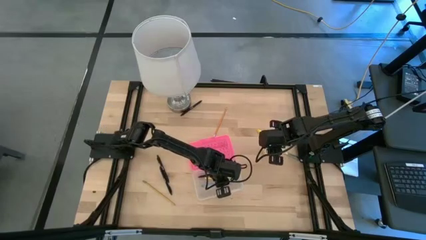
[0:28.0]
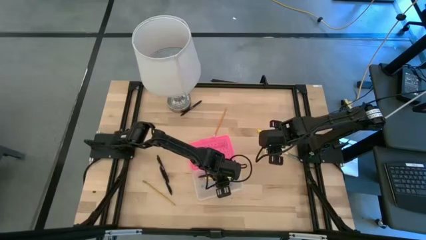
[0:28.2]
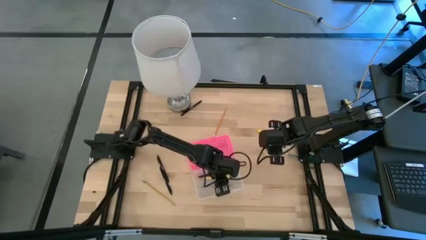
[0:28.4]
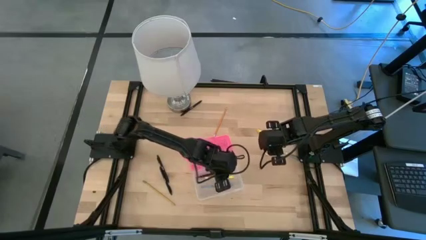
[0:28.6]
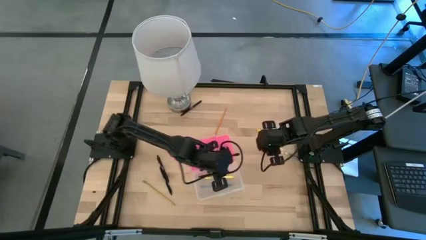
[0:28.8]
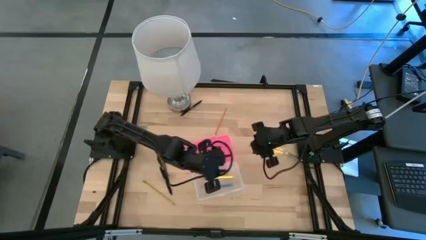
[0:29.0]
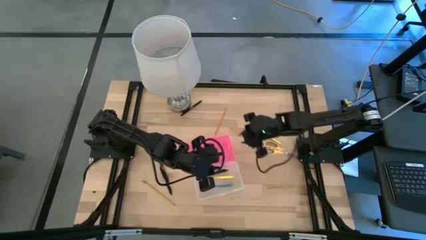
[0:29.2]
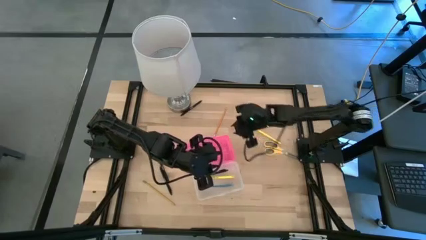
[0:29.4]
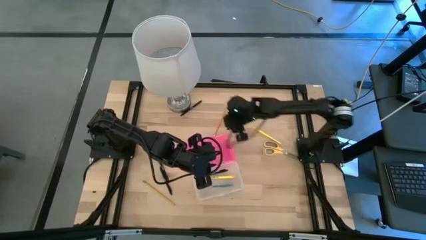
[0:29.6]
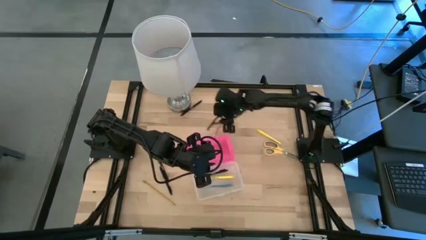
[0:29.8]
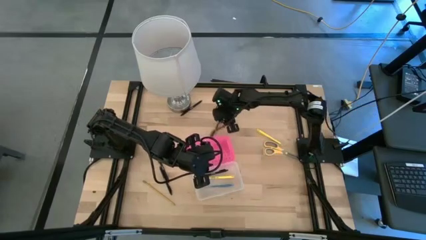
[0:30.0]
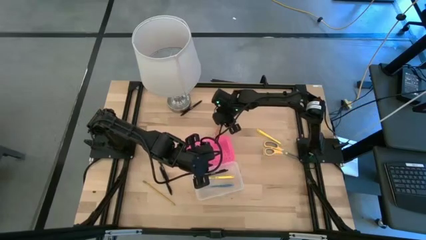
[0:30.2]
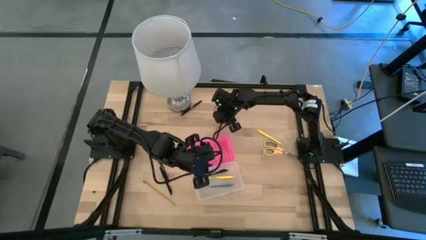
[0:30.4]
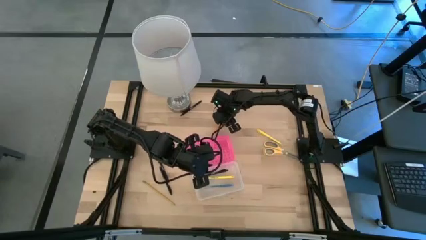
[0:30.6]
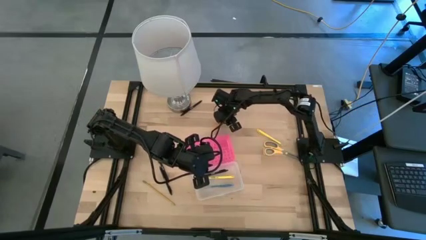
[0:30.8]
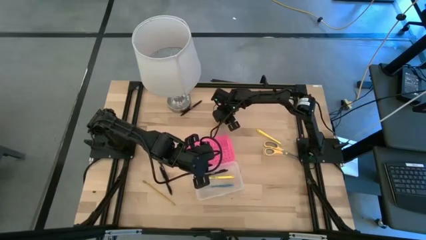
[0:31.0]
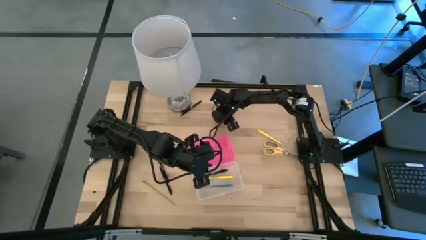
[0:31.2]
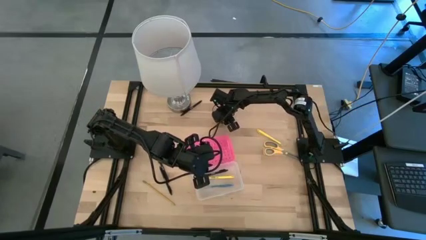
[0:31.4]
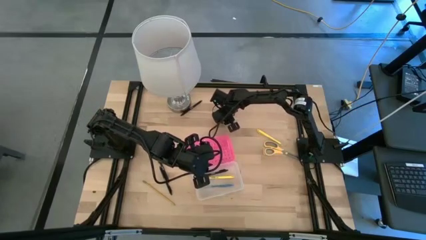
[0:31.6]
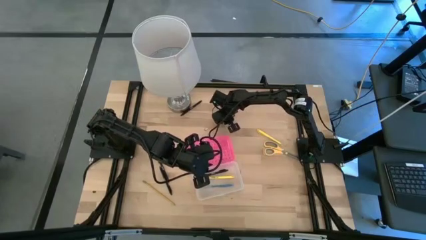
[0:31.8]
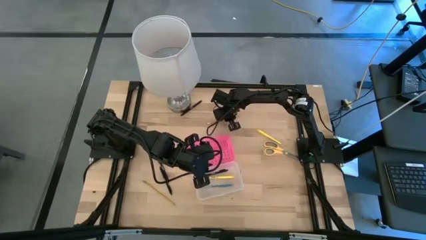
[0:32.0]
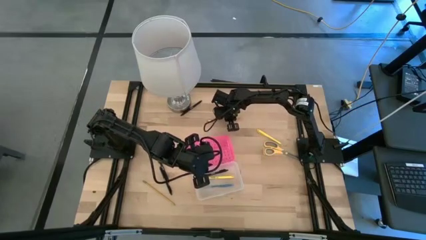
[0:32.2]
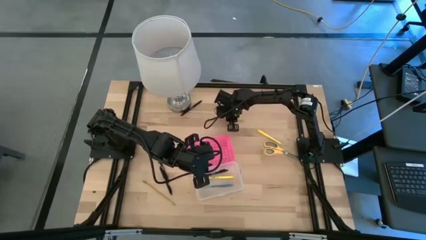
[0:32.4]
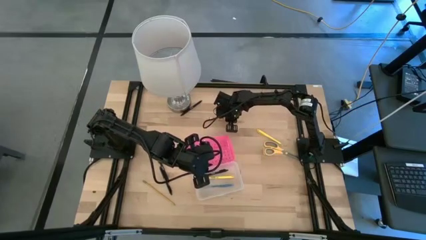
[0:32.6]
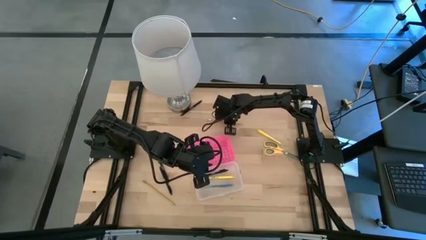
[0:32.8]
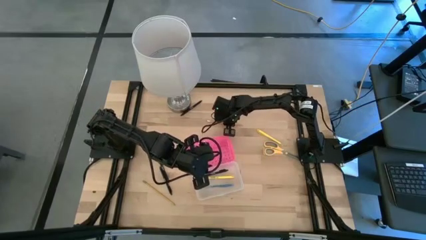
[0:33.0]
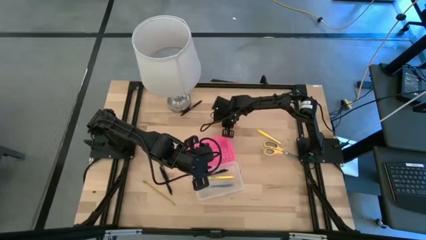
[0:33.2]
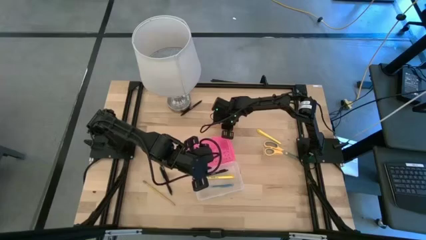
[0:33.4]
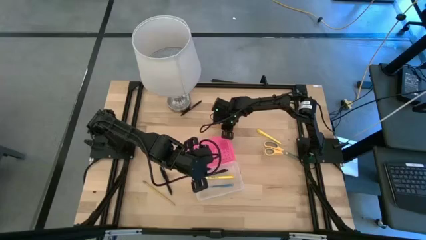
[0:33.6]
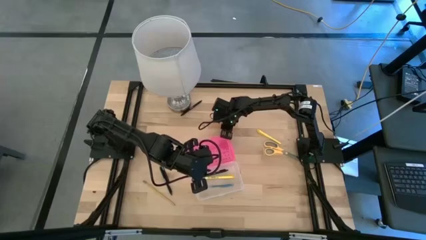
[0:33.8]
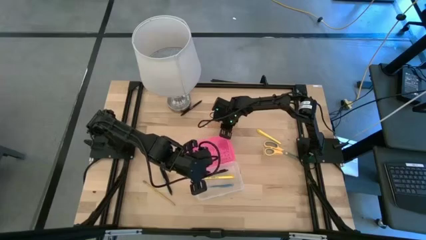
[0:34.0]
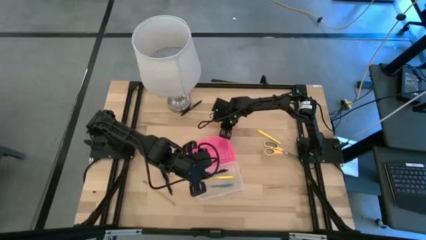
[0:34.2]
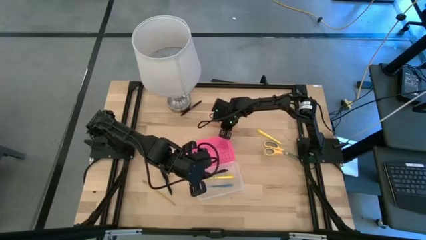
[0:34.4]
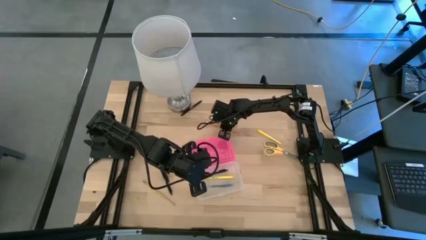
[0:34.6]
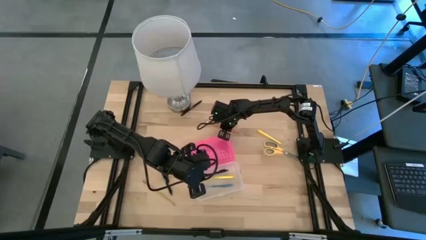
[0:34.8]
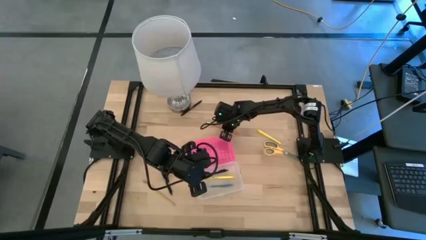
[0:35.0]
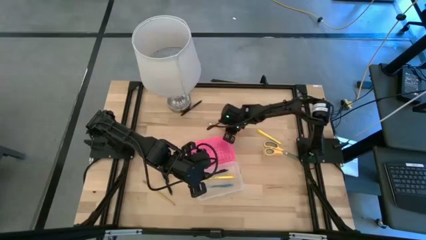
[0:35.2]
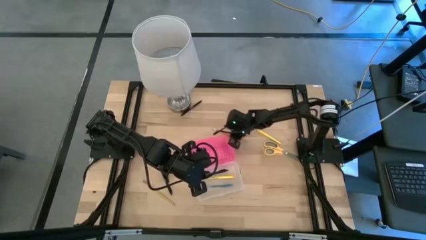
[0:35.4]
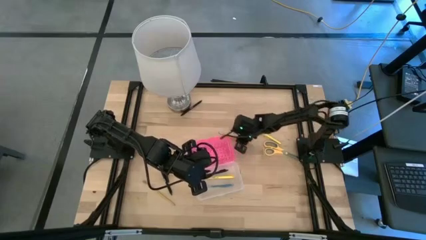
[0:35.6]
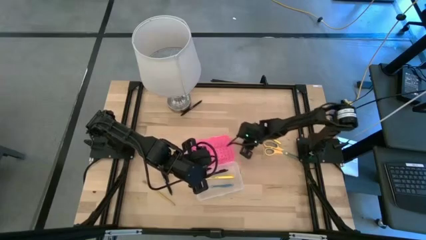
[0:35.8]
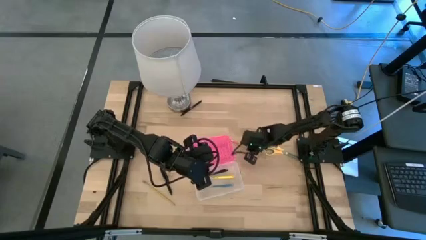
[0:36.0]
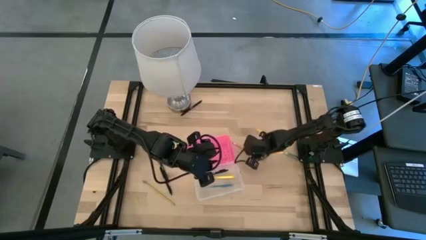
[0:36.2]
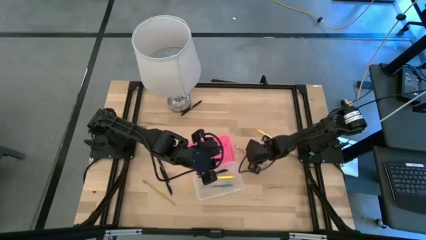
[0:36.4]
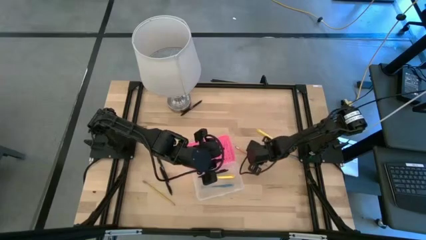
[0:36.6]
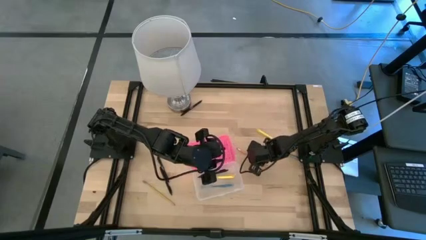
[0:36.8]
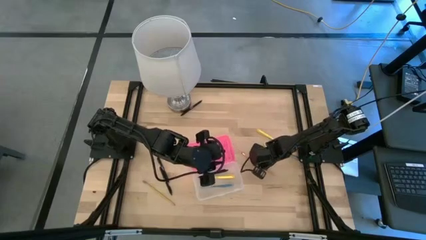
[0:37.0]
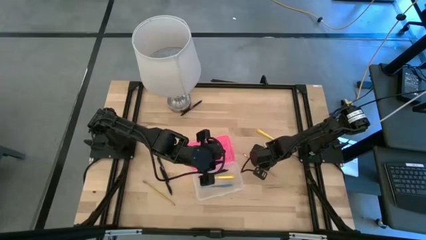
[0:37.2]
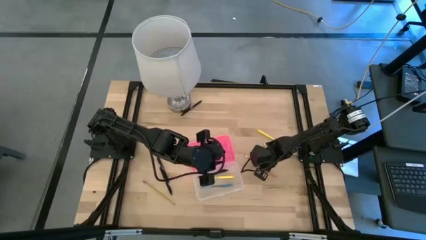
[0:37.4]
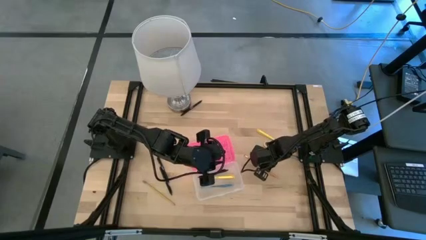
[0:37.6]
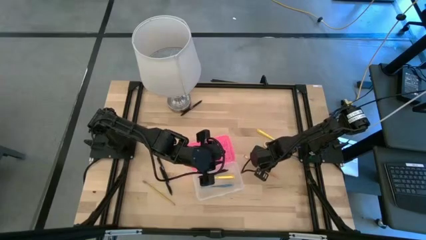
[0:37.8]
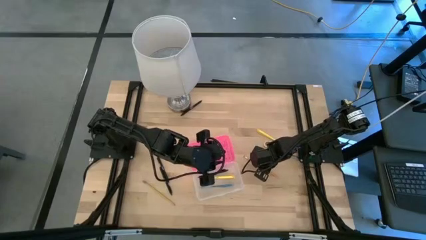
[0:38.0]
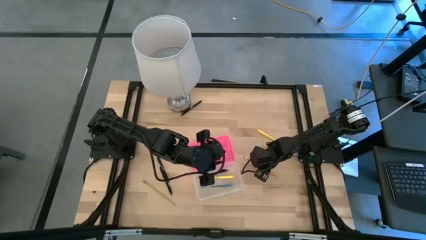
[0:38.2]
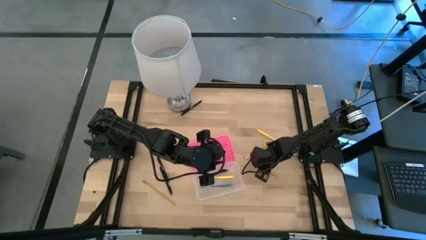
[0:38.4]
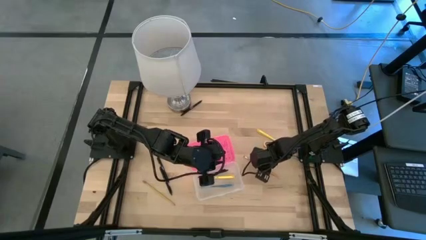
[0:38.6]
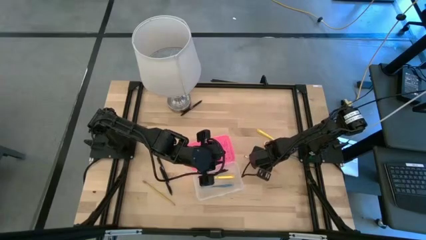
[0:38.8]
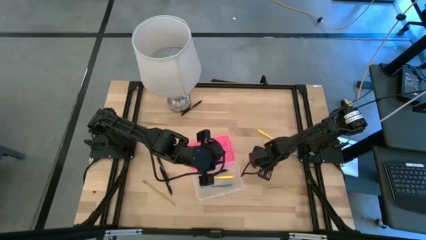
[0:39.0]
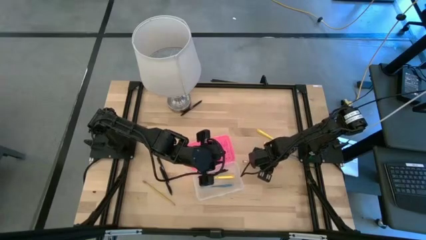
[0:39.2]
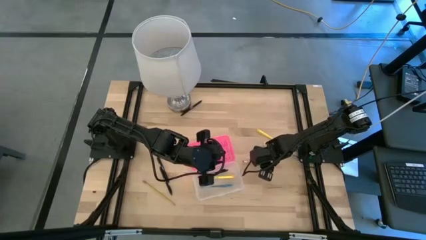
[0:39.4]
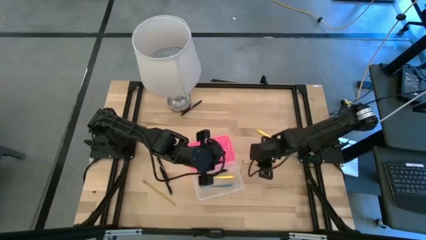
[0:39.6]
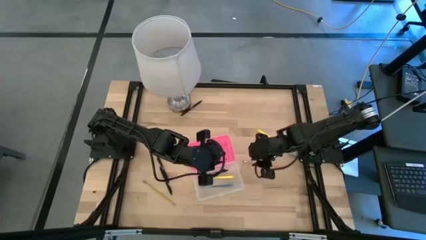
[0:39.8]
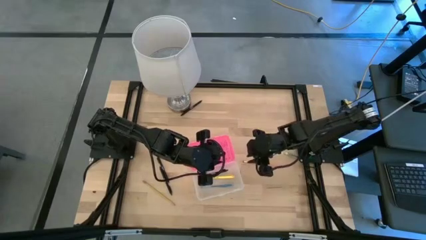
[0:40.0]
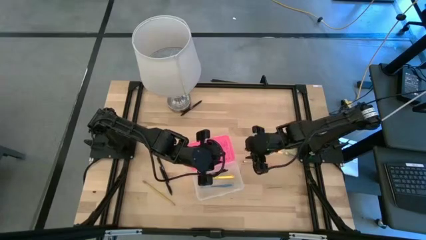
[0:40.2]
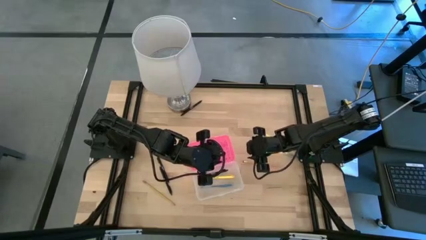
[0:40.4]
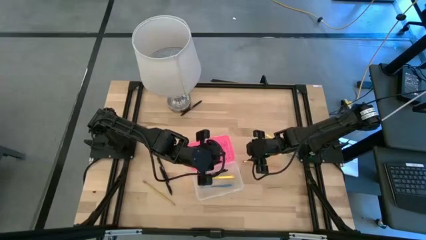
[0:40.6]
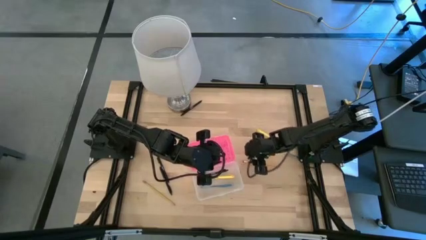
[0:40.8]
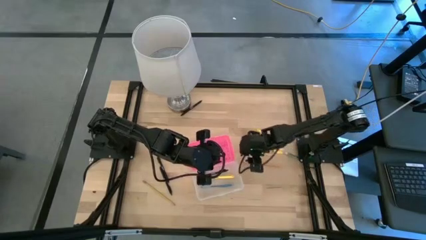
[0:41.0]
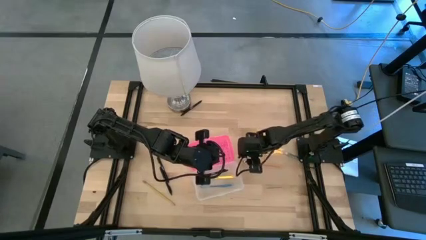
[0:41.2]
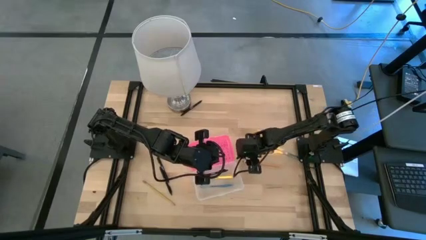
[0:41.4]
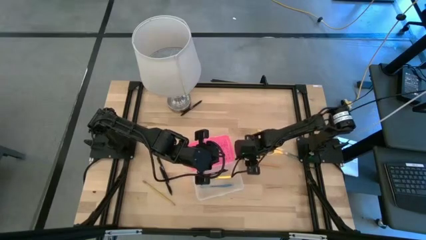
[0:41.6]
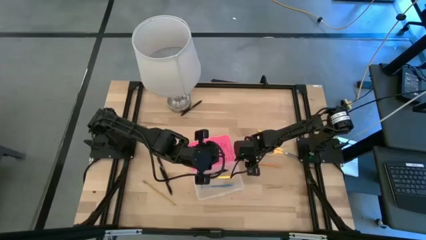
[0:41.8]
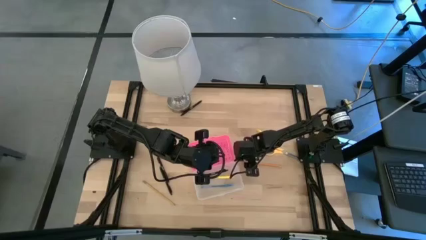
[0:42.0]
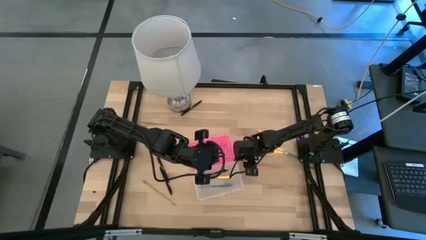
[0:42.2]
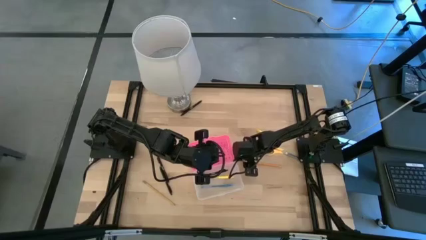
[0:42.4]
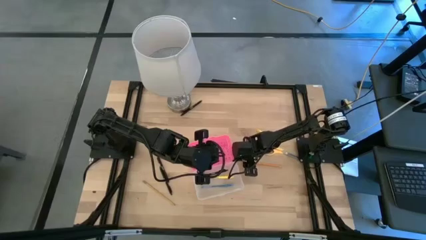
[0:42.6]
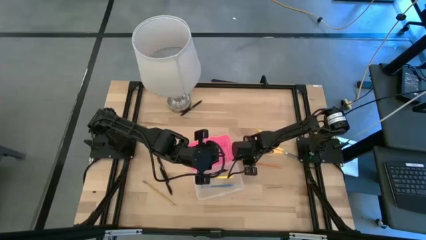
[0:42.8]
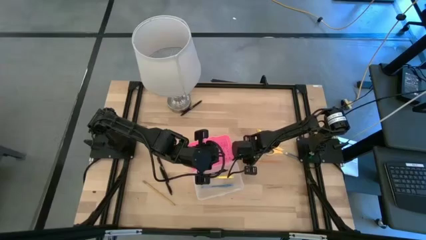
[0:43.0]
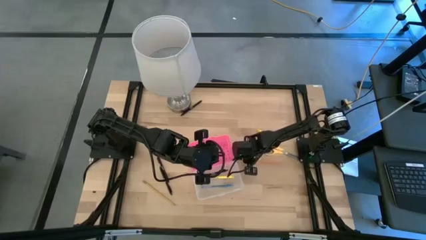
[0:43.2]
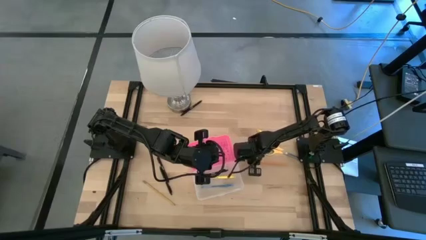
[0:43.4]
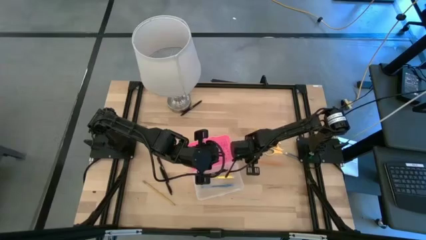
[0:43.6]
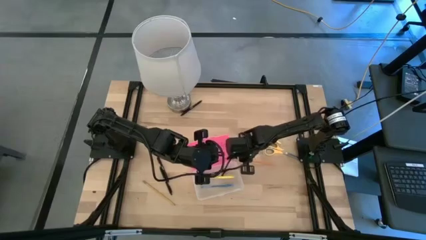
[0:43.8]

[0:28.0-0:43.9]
Task: Pick & place school supplies into a supply box
Put the orange pencil into the transparent supply box
